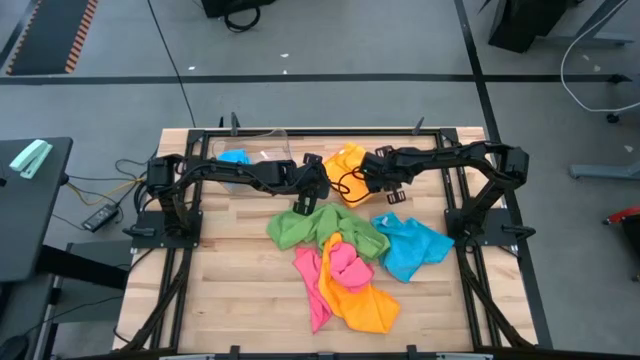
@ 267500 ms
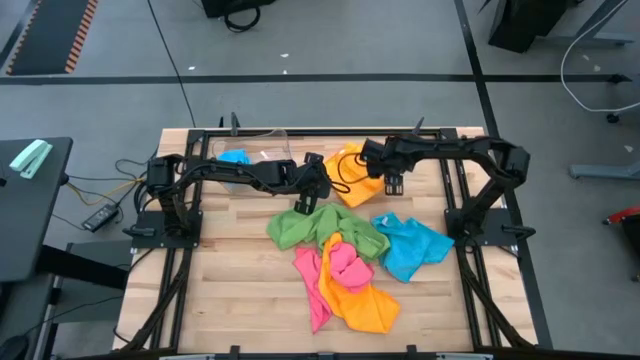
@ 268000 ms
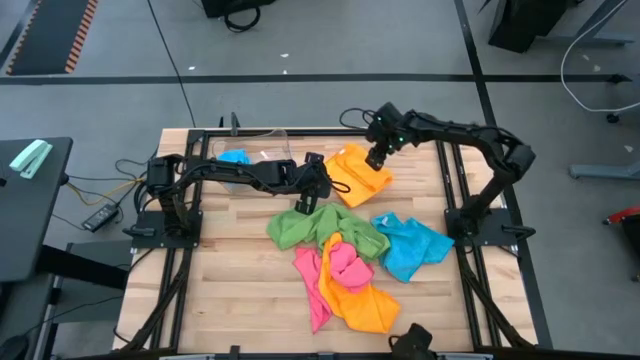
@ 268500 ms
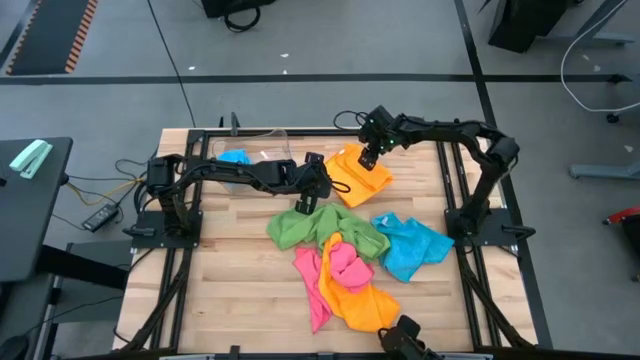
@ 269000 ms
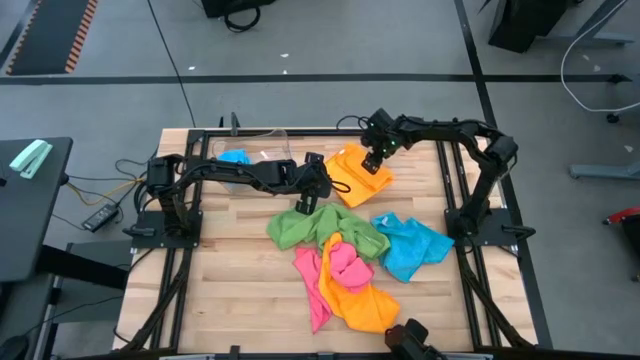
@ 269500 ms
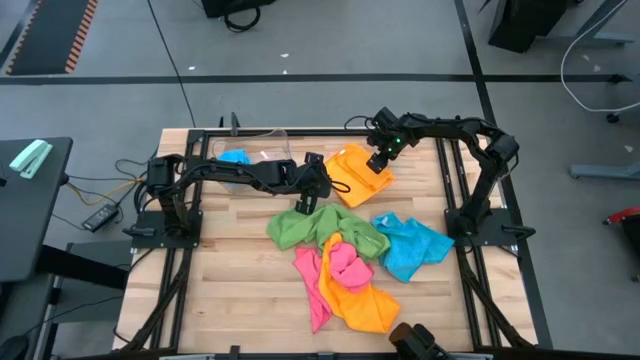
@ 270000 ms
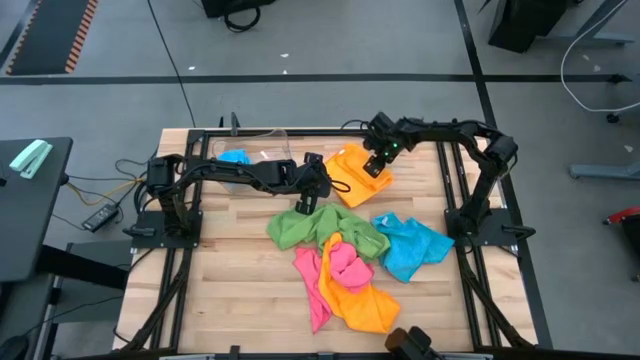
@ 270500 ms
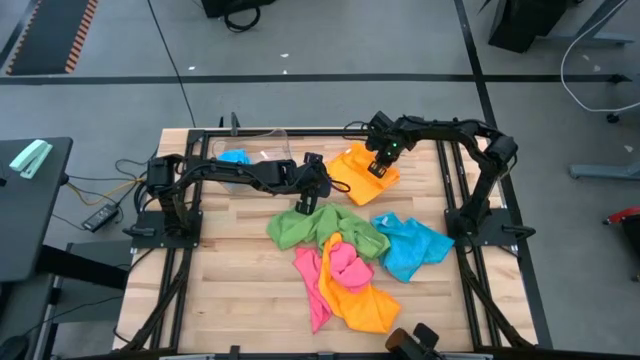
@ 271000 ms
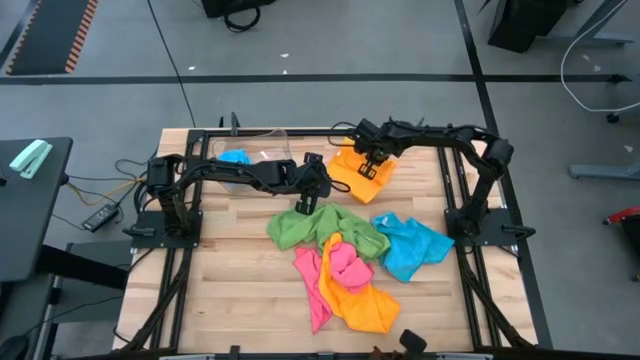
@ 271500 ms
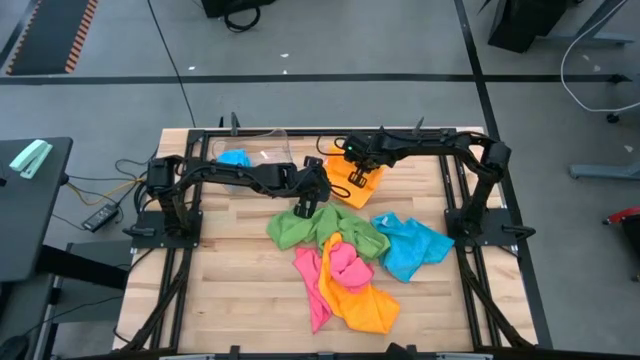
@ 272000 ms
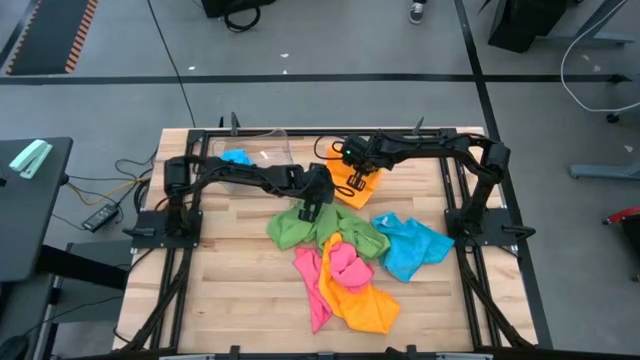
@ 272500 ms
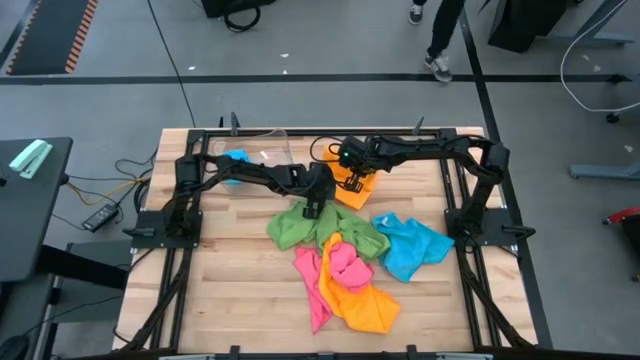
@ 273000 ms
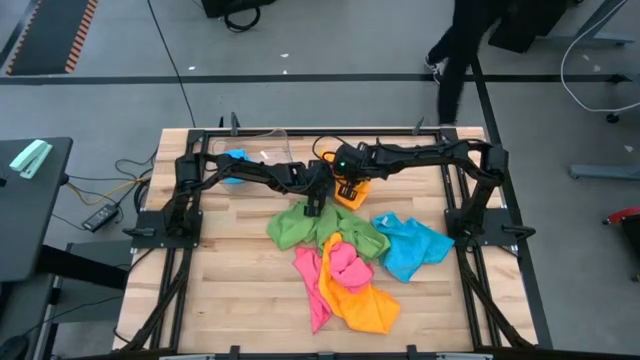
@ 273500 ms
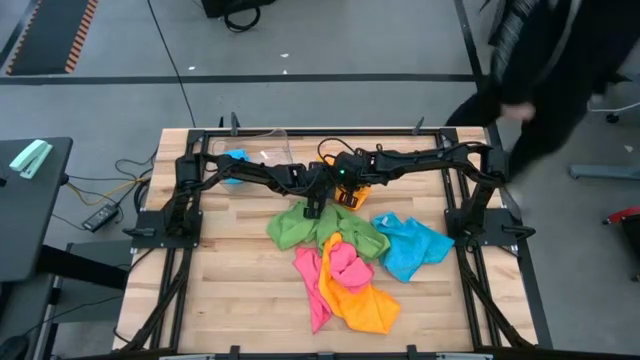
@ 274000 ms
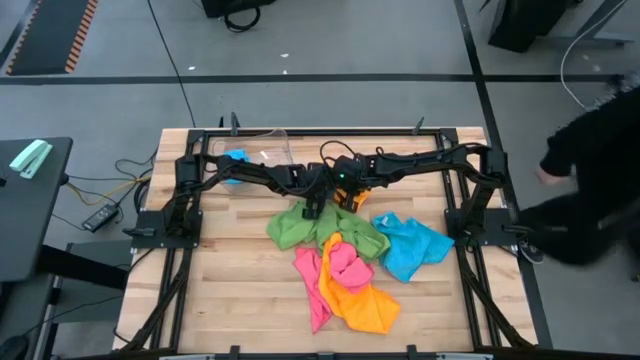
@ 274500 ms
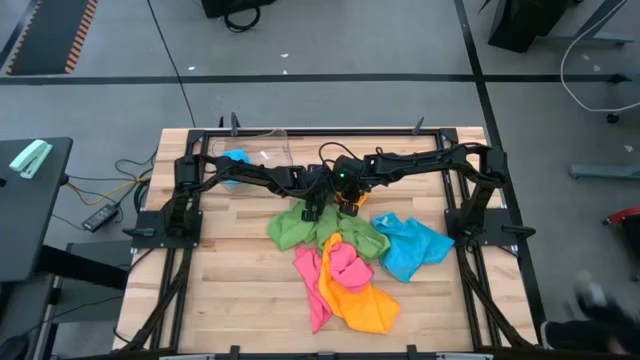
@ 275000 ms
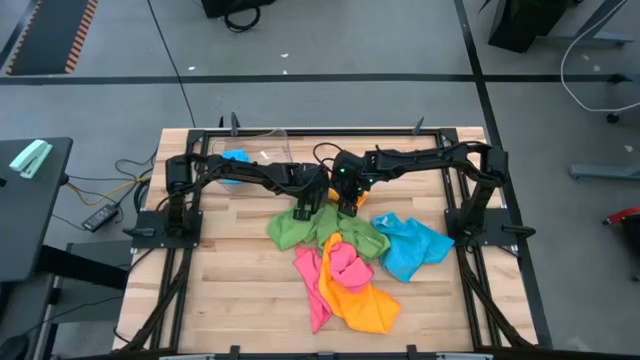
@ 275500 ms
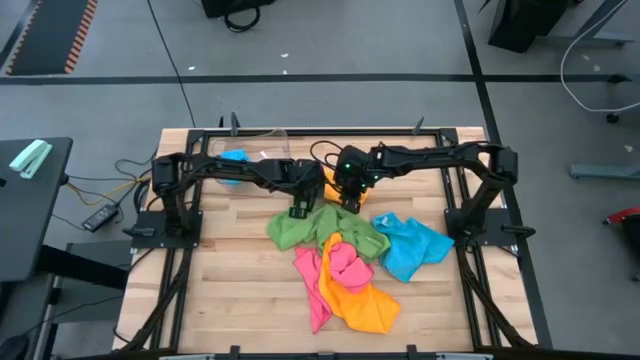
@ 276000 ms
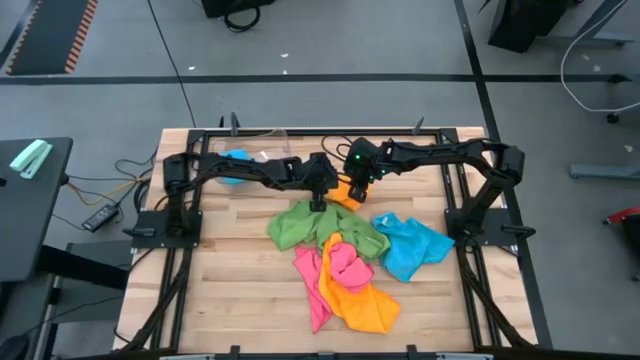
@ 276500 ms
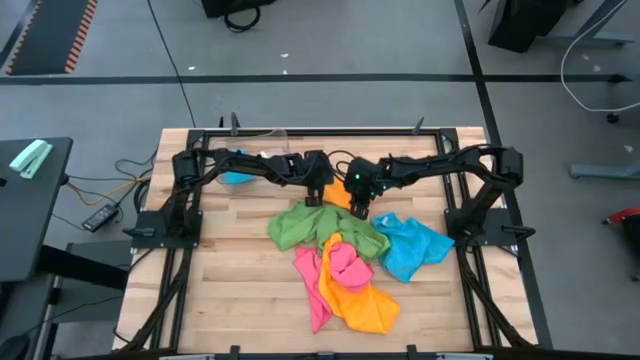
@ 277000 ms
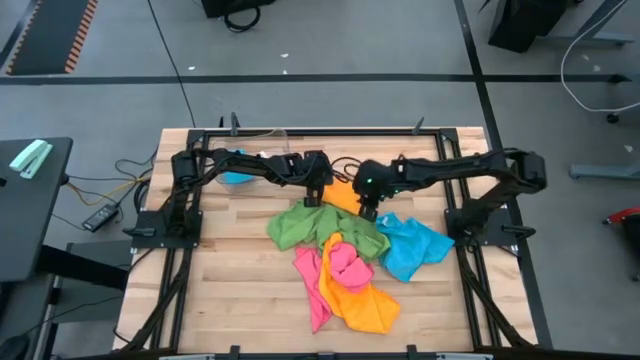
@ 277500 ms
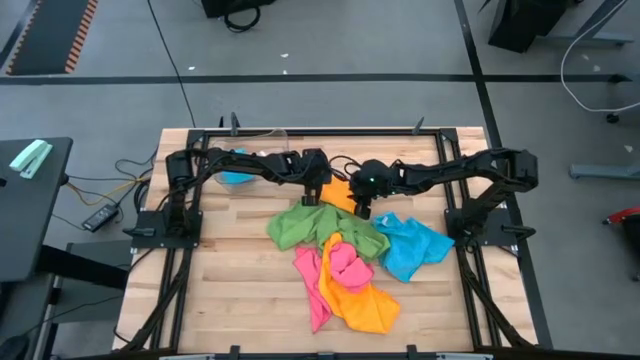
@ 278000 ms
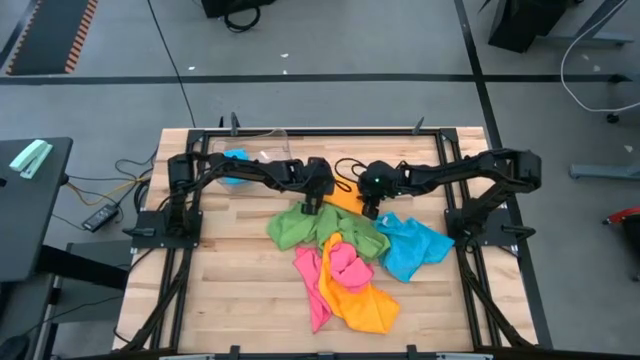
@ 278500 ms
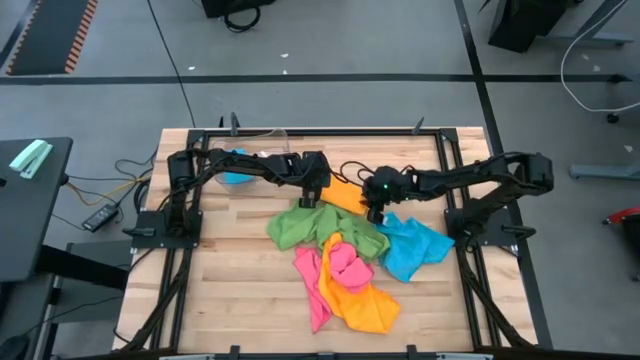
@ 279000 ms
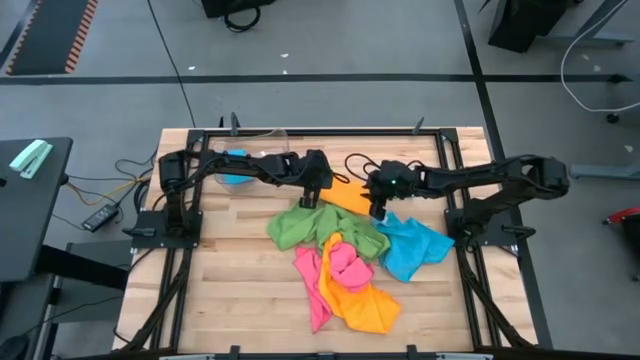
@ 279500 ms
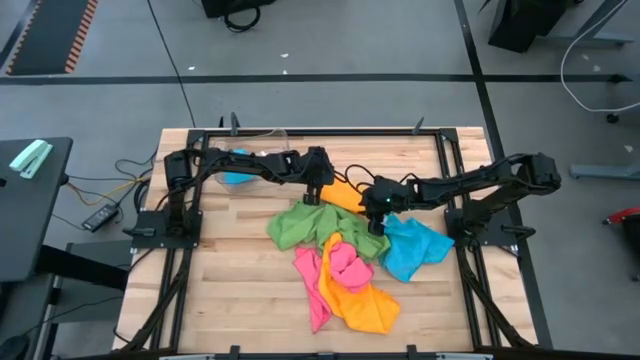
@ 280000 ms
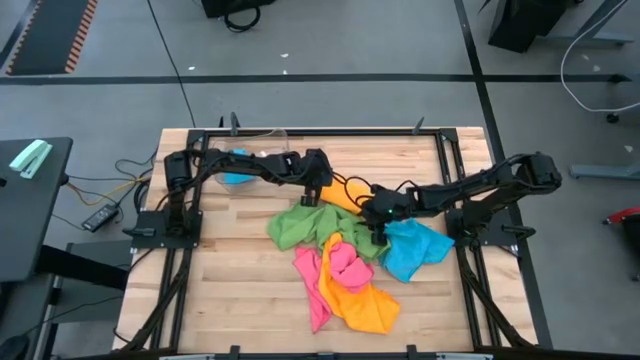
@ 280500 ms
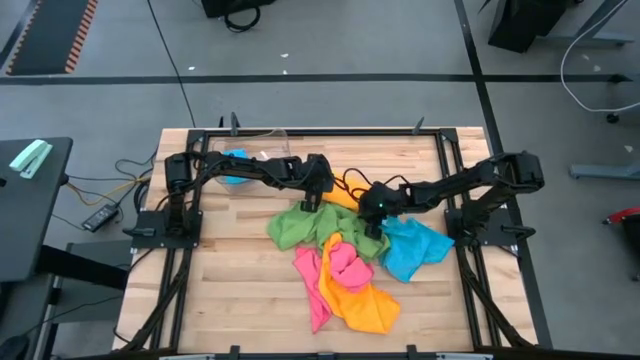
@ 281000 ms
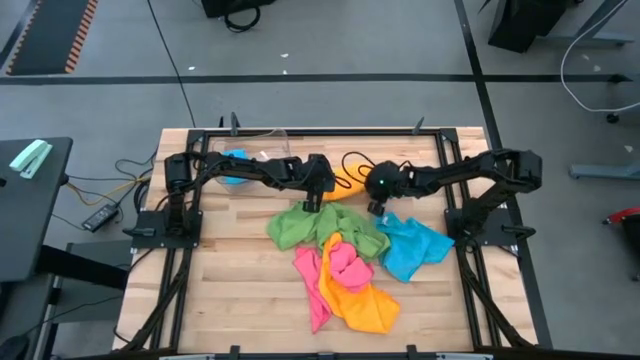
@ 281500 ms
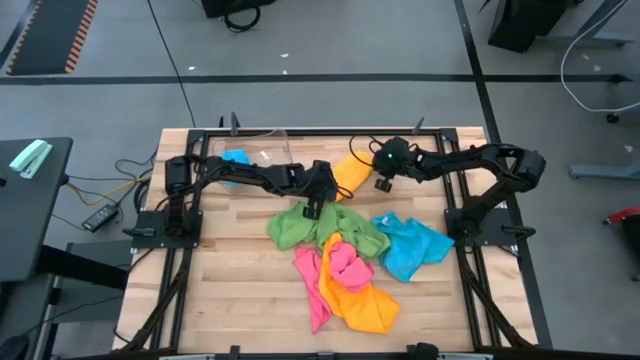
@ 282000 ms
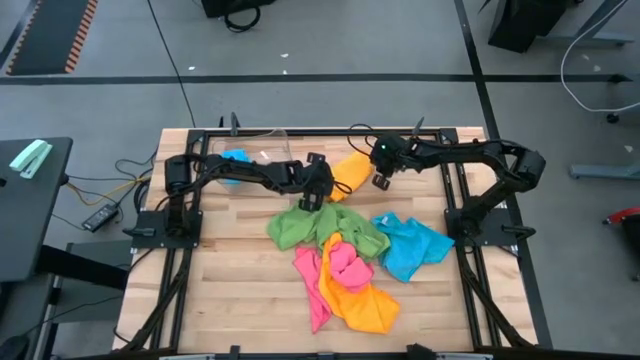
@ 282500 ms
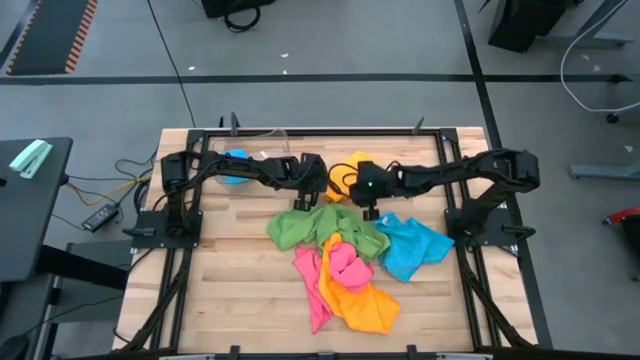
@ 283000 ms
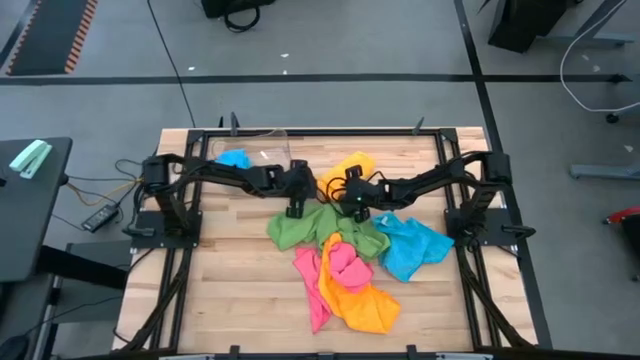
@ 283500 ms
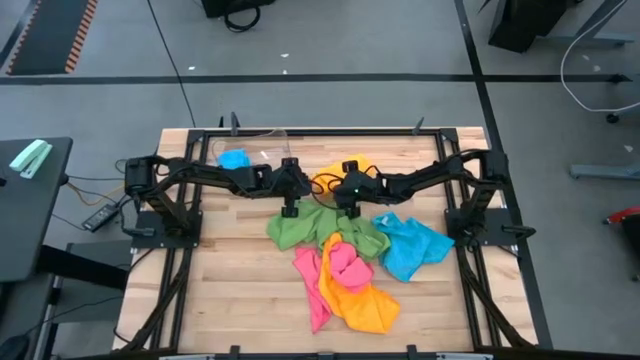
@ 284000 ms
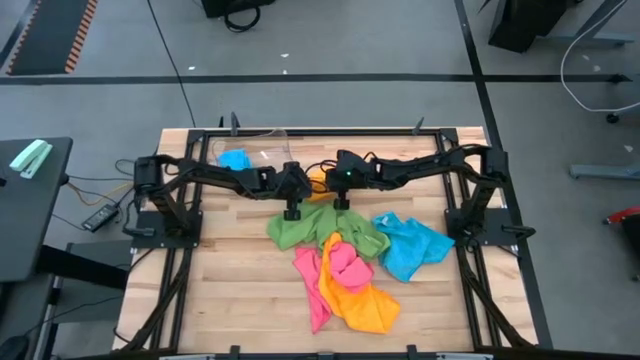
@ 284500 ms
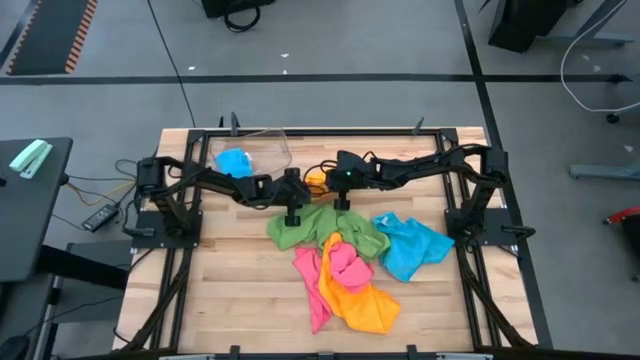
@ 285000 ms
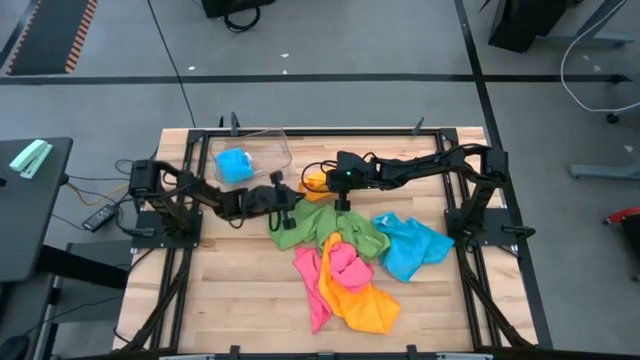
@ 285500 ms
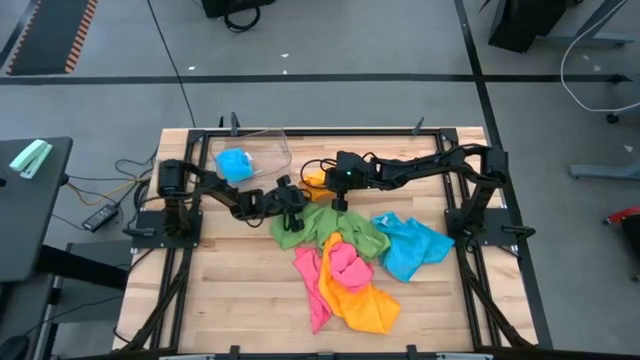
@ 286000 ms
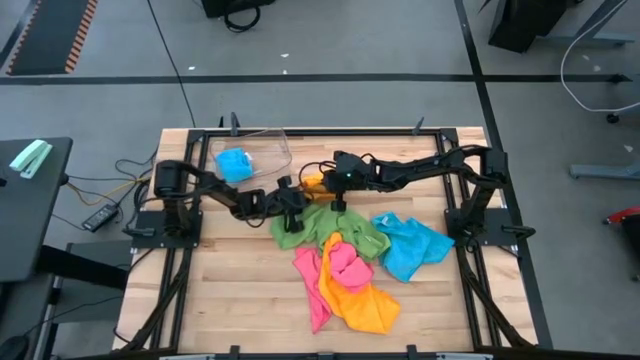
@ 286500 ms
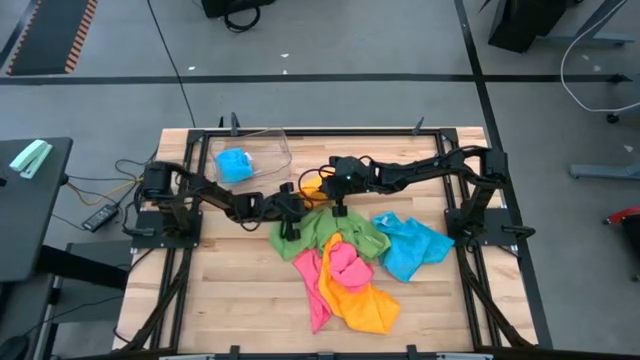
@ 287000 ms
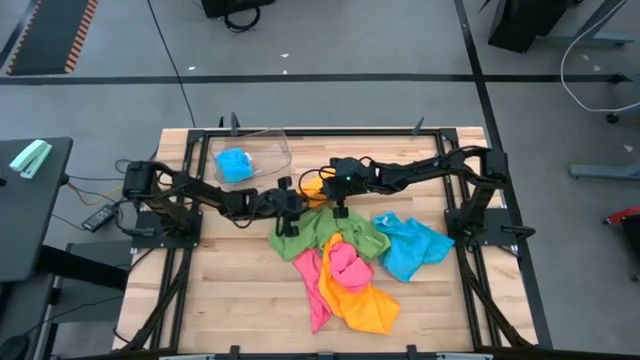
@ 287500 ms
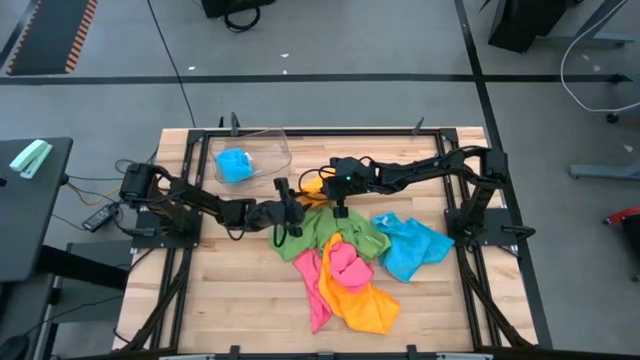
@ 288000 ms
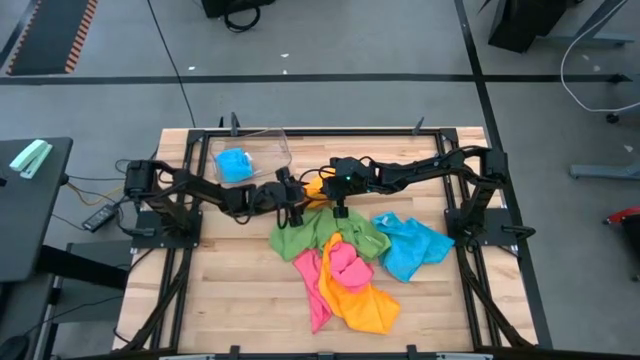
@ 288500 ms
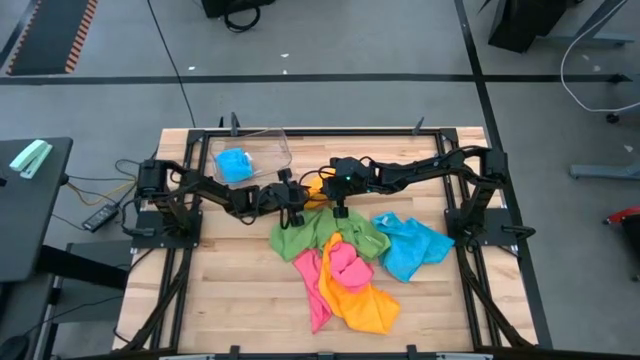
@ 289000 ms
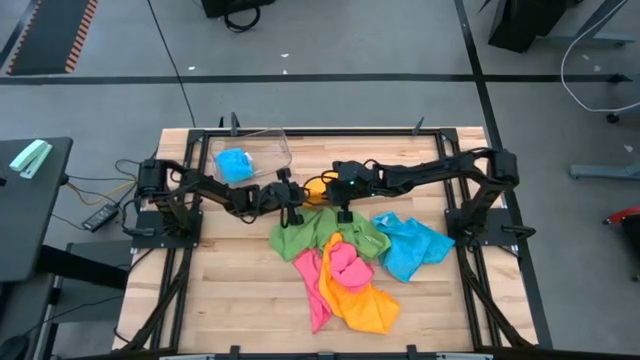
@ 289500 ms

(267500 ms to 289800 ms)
Task: Fold microfiber towels
Fold the top orange microfiber towel
